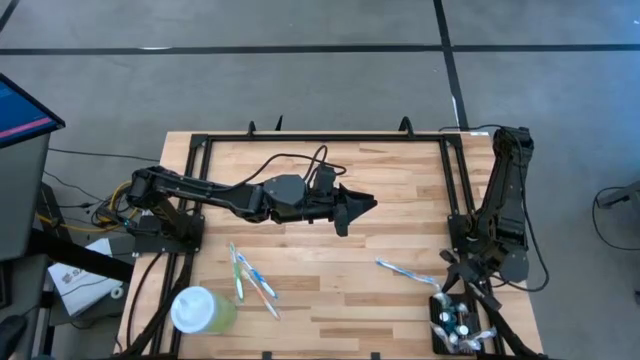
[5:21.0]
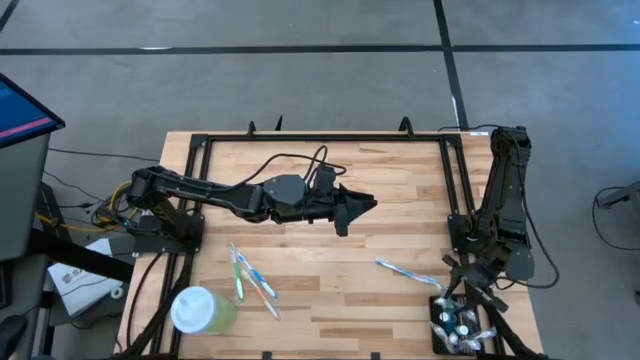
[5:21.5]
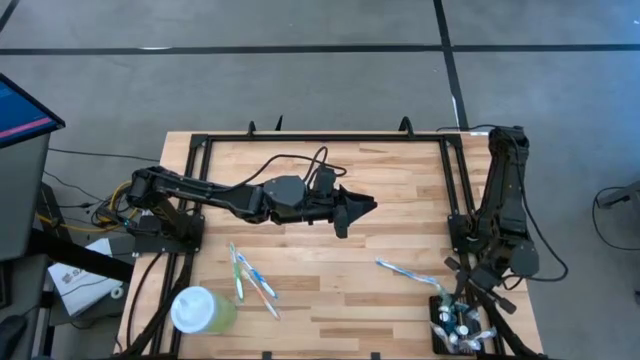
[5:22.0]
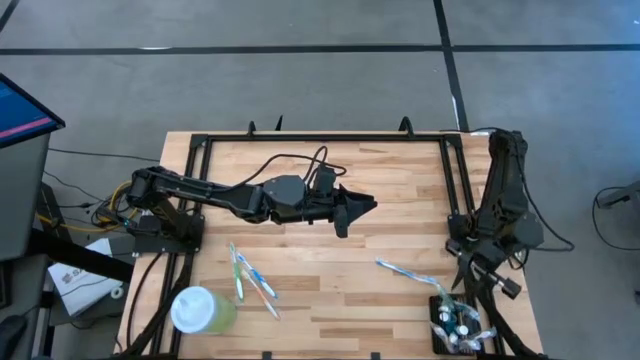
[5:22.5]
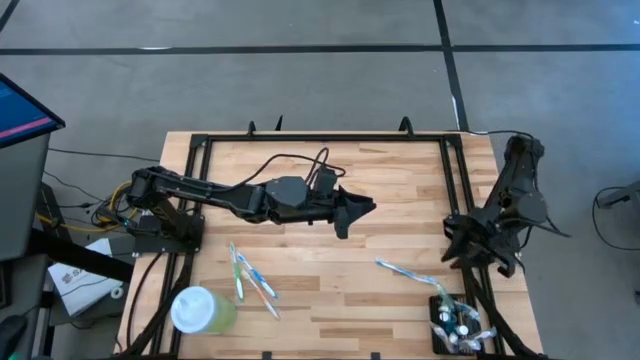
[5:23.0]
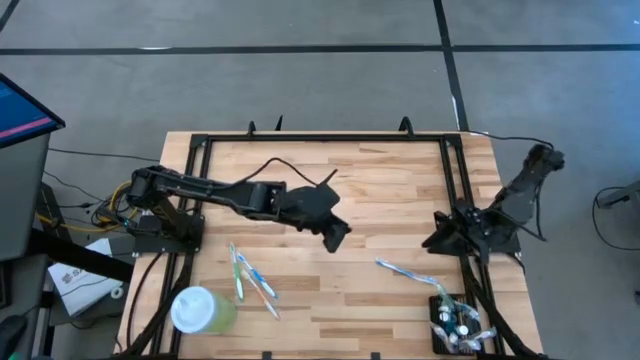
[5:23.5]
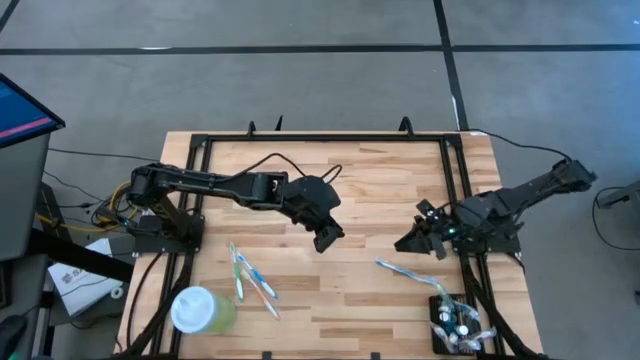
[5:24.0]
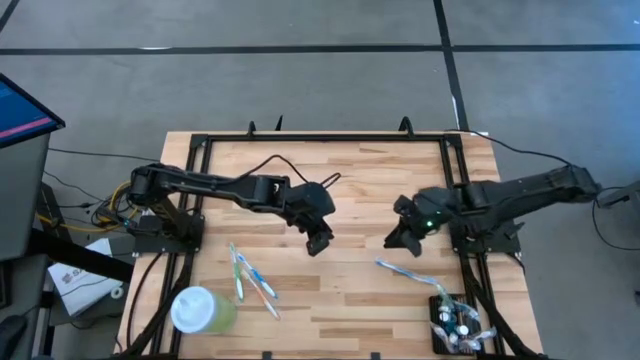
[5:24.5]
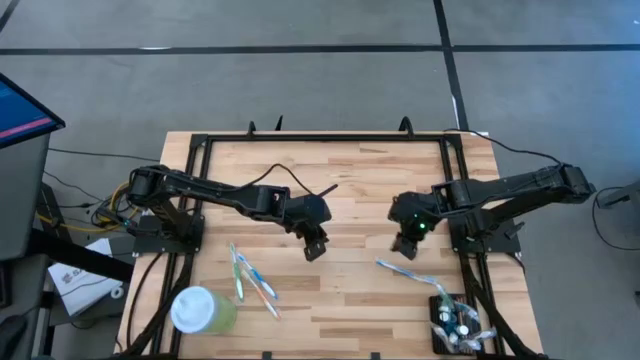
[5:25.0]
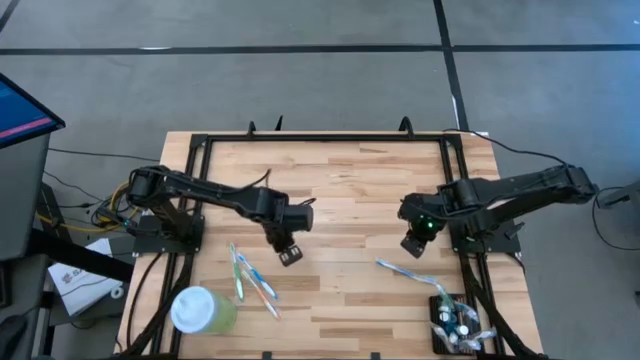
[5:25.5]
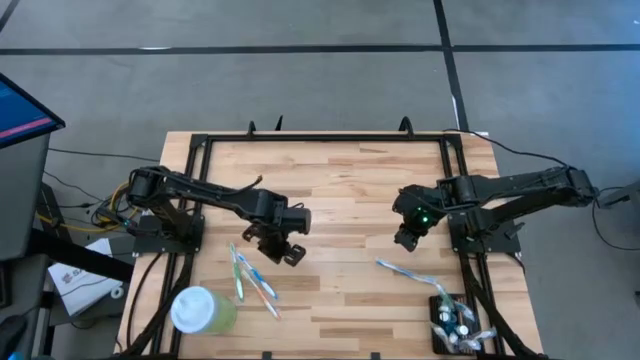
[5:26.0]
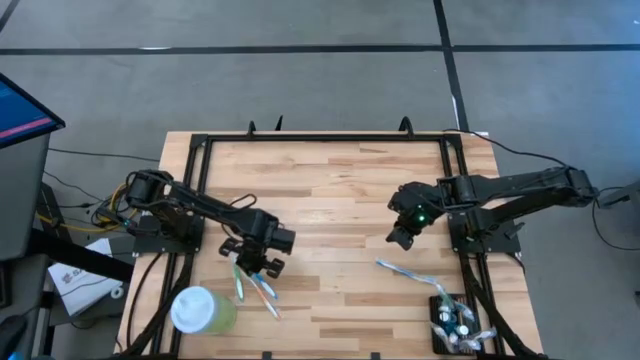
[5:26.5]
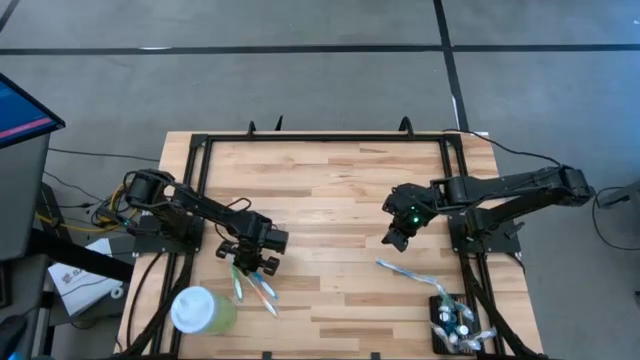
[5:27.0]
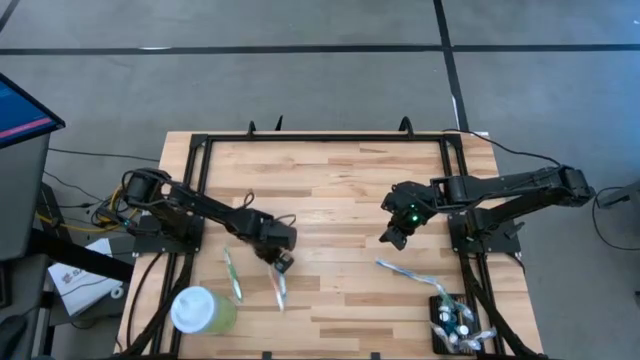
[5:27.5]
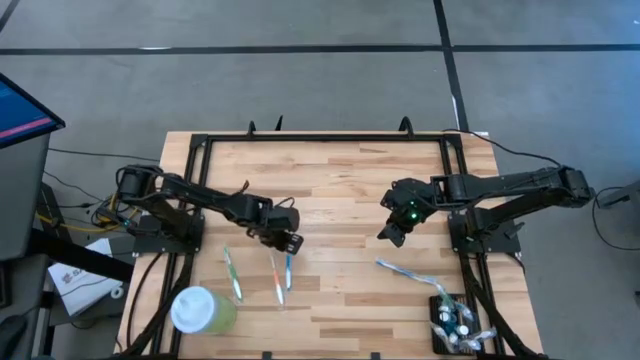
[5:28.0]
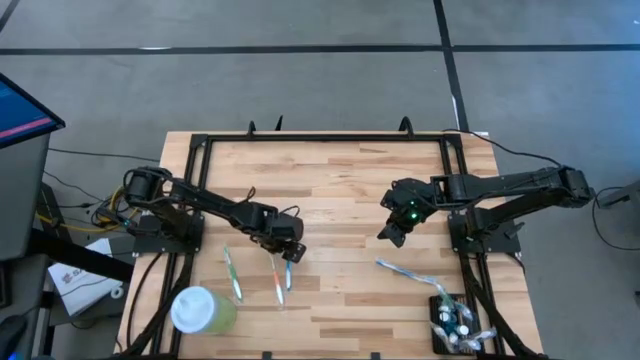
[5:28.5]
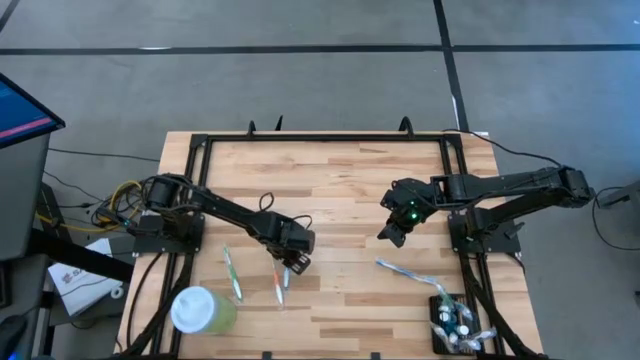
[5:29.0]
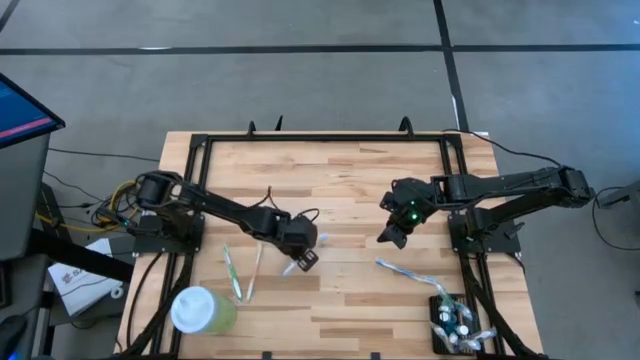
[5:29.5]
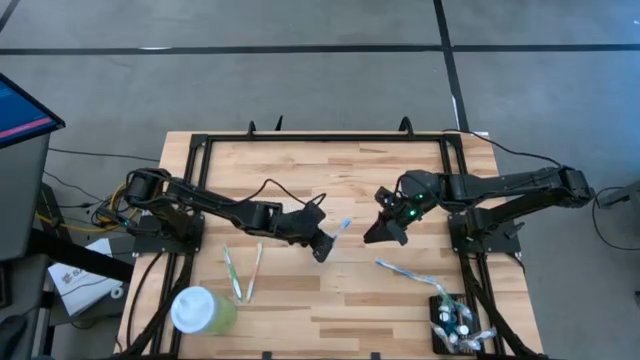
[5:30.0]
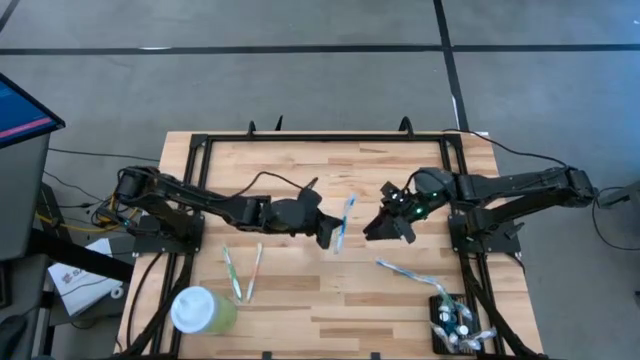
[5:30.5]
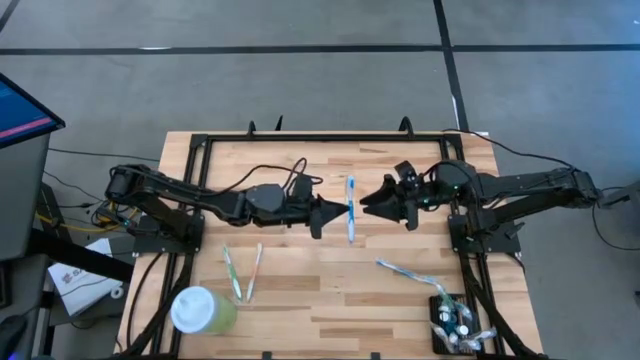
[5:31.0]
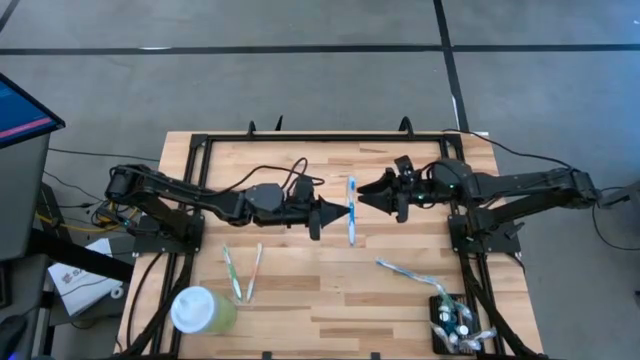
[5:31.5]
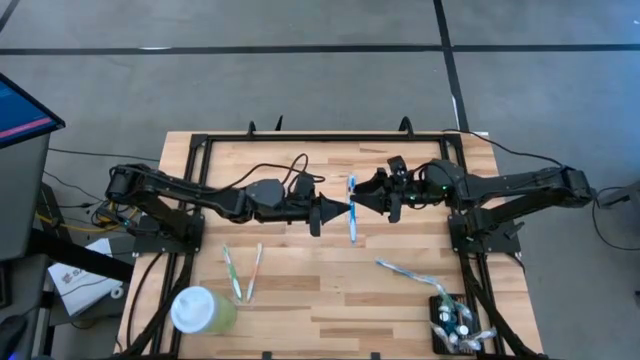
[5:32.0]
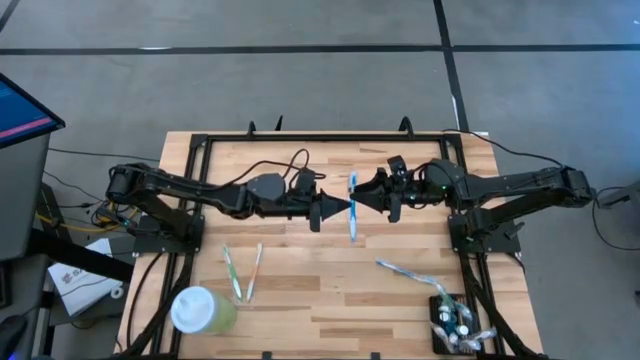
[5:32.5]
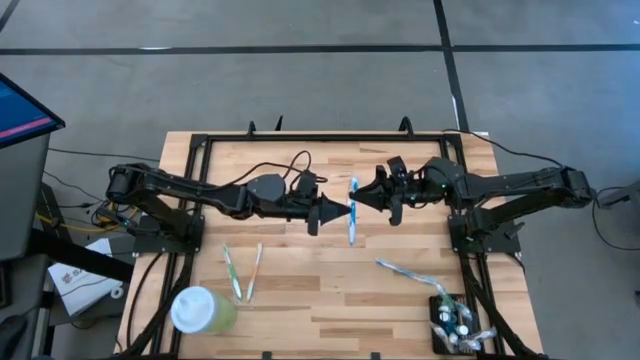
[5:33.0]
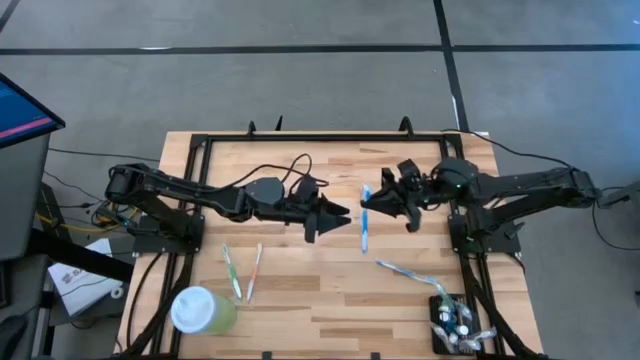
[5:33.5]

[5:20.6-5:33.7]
Task: Pick & Place toothbrushing station
Put the left blue toothbrush into the black organizer

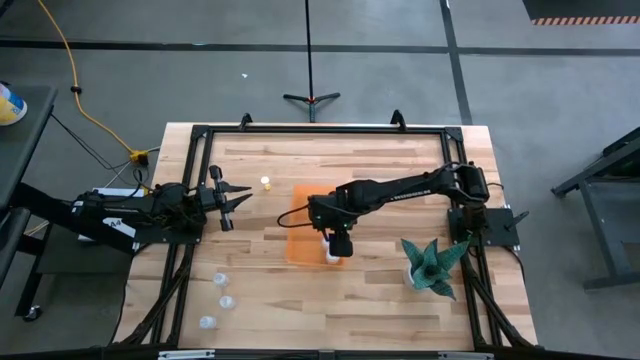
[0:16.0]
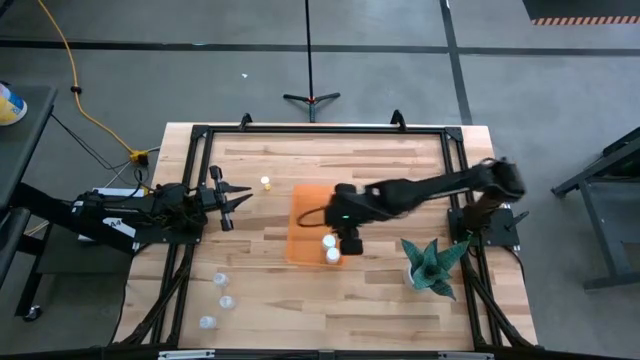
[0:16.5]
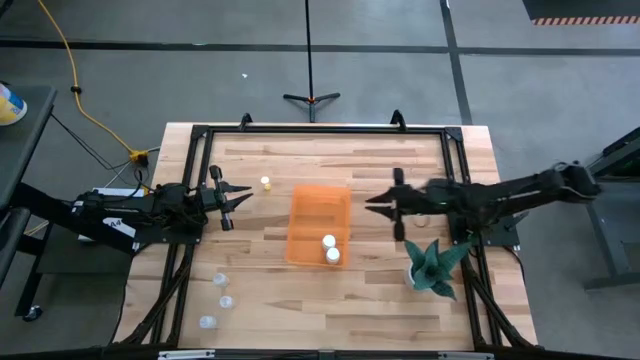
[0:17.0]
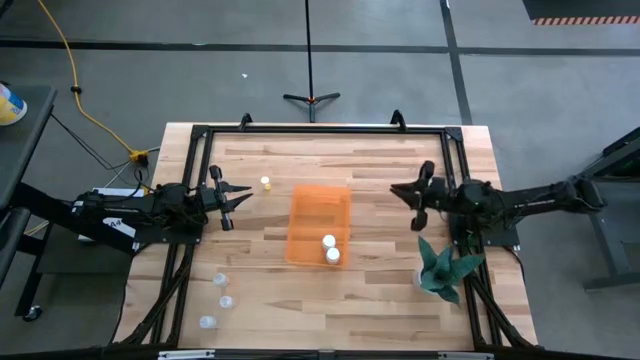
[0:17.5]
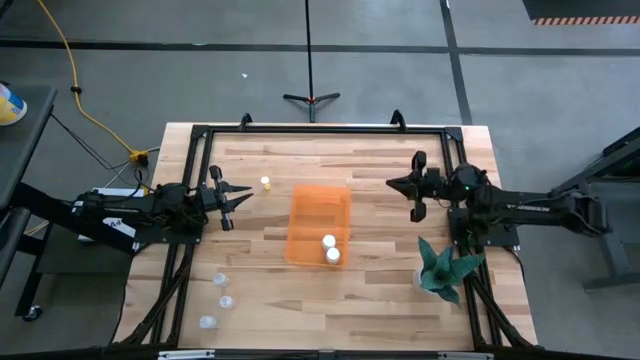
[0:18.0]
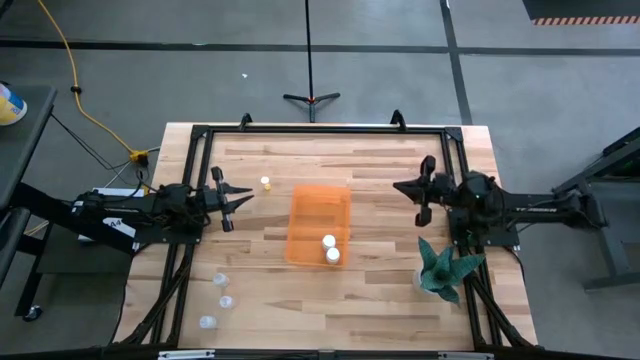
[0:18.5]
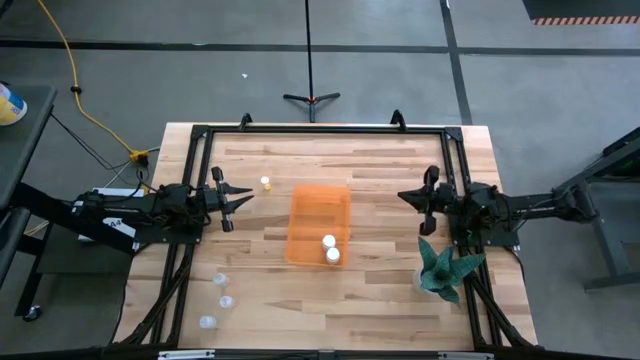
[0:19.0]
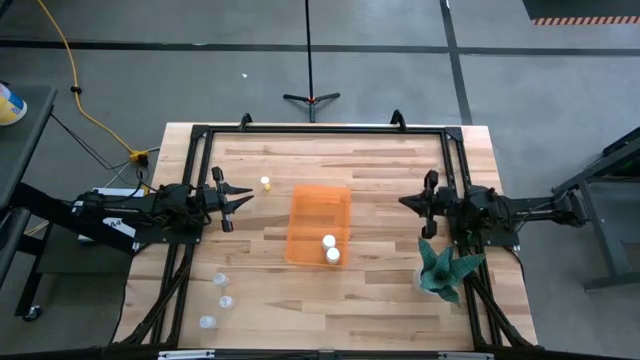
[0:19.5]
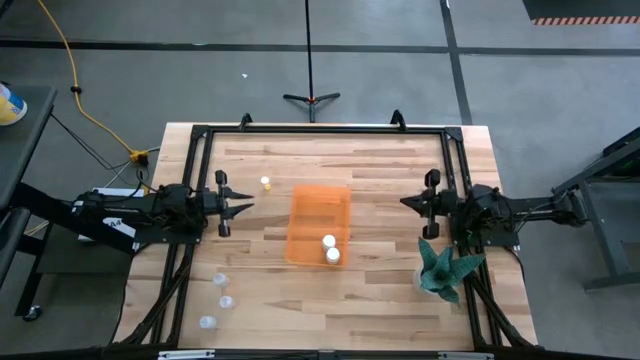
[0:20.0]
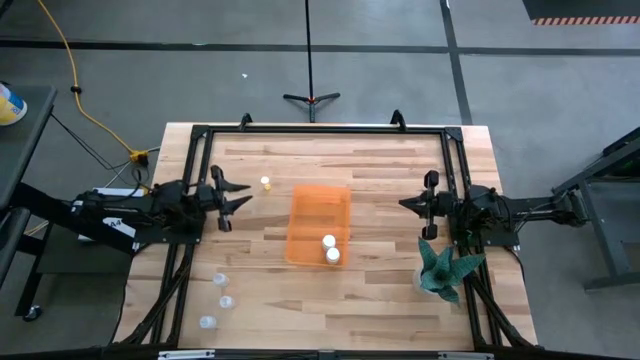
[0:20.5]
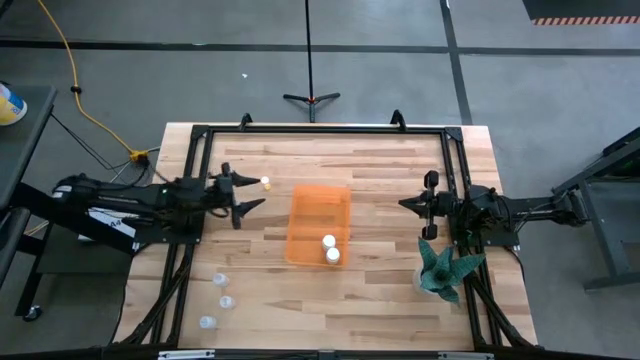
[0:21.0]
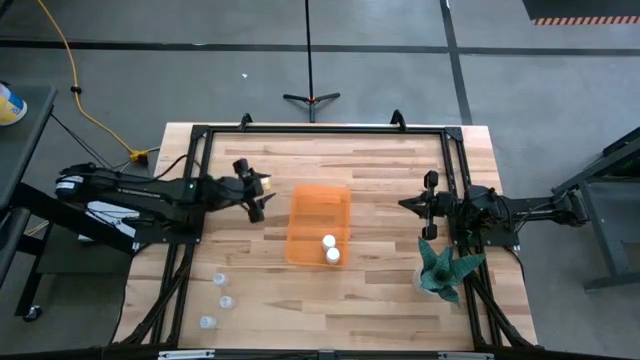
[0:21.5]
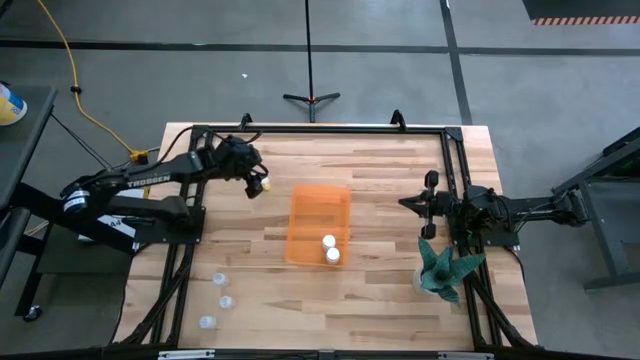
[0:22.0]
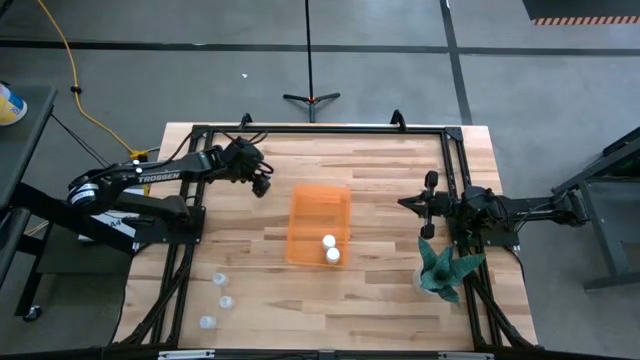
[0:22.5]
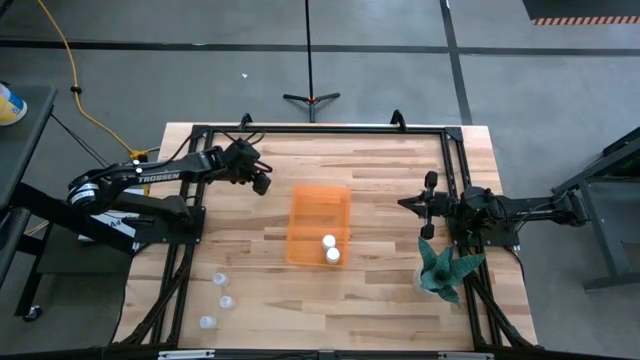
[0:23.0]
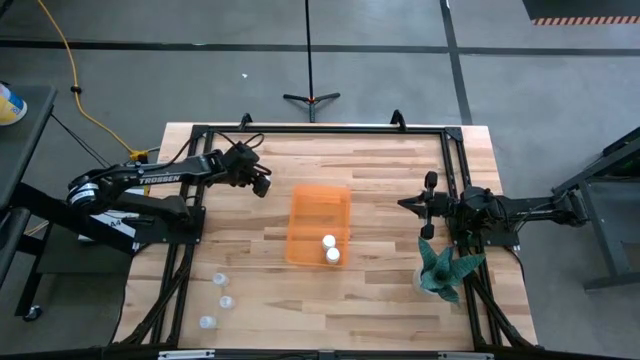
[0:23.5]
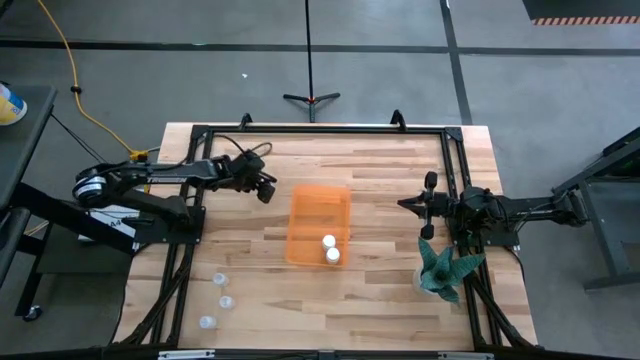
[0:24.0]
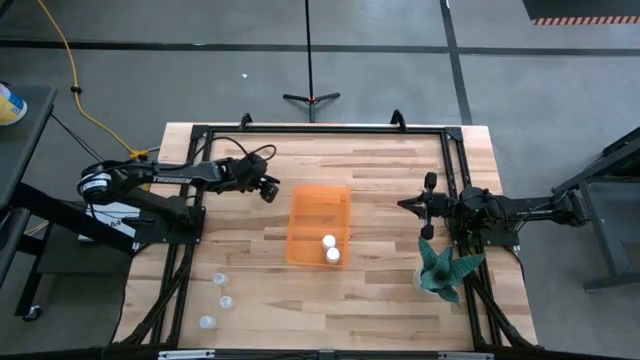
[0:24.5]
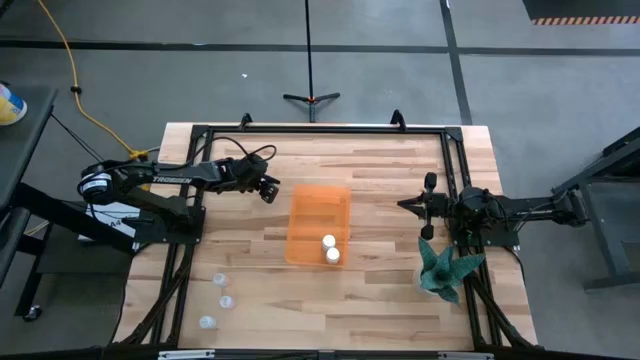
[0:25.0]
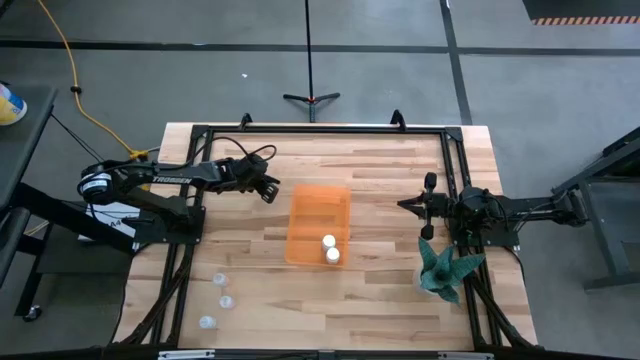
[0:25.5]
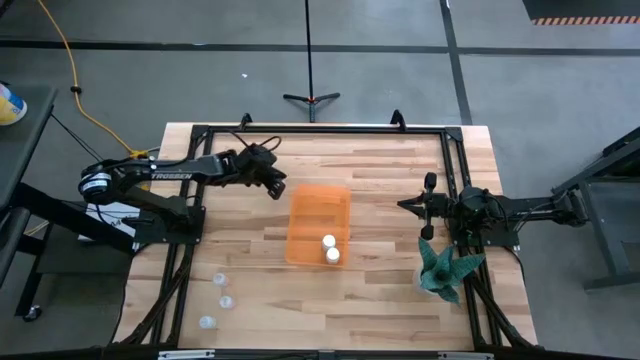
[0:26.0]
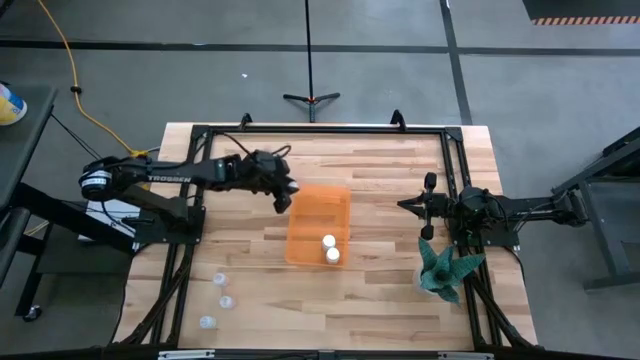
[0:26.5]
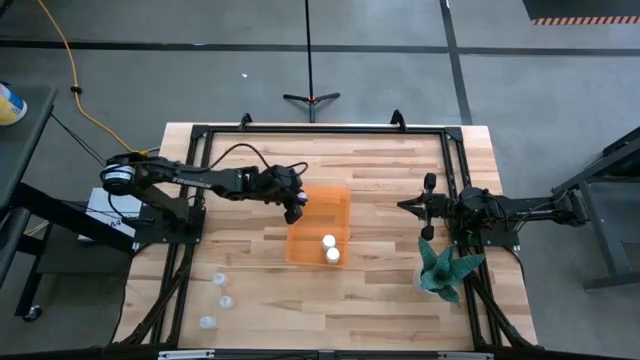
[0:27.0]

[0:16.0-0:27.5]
Task: Pick and place pill bottles into a basket
Put the yellow pill bottle into the orange bin
